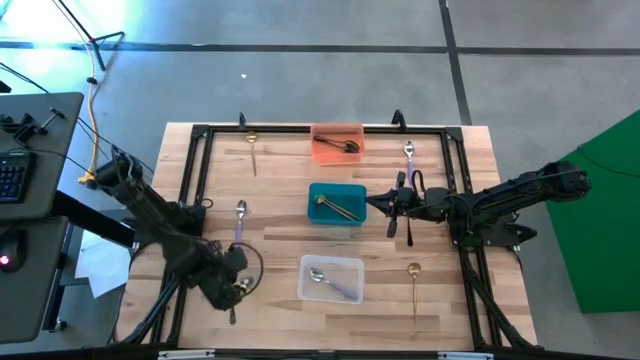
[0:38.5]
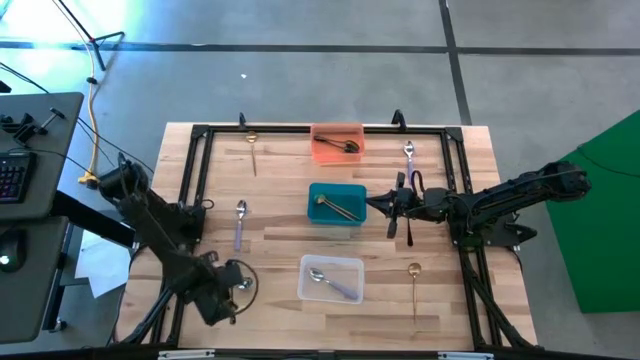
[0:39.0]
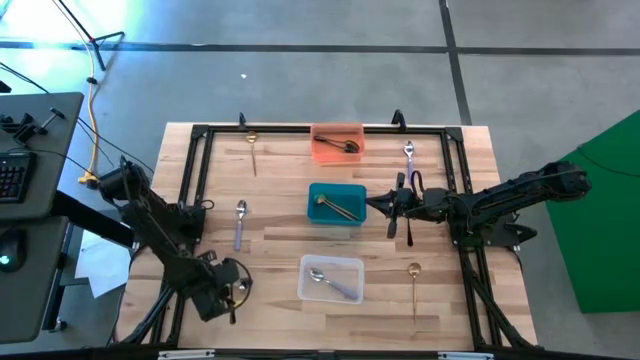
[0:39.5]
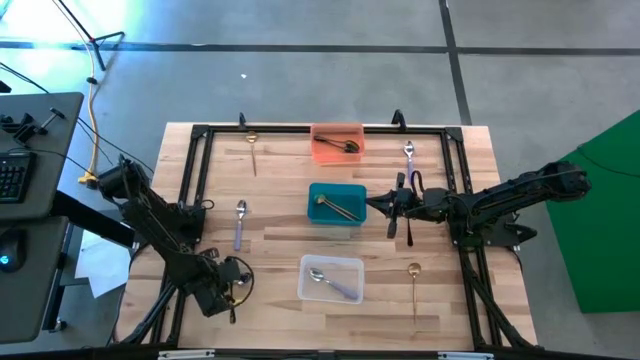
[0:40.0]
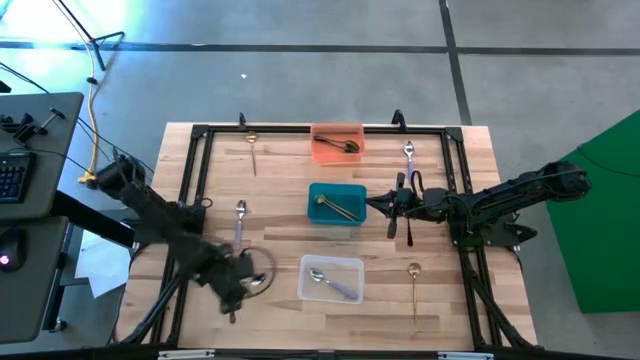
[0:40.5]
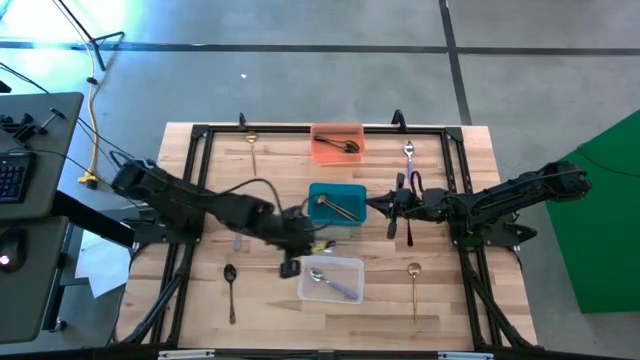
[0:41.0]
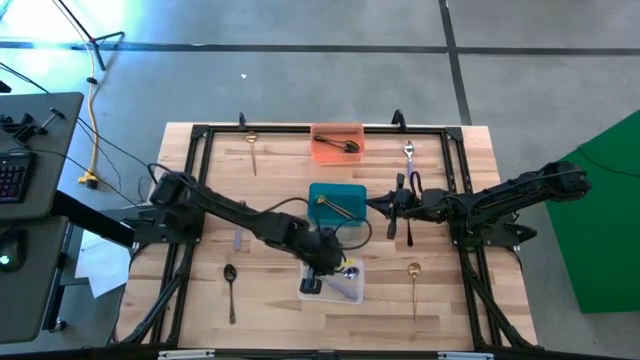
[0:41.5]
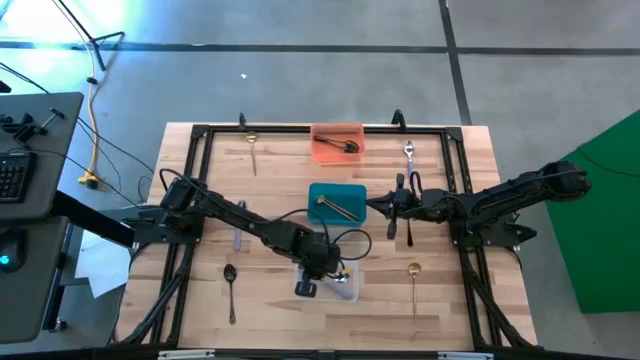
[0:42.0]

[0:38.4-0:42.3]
Task: Sort silverware by color (type)
Put the purple spoon into the transparent bin

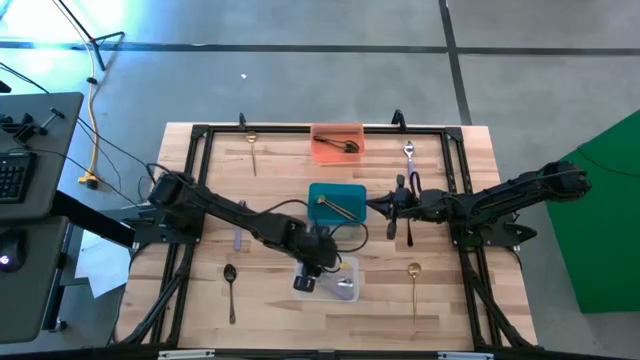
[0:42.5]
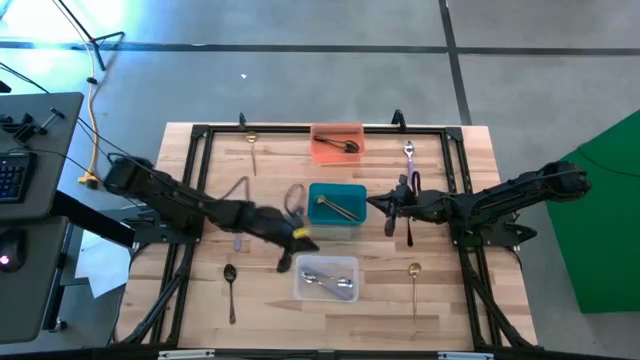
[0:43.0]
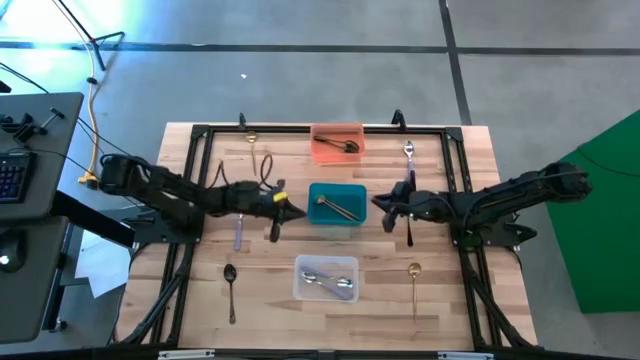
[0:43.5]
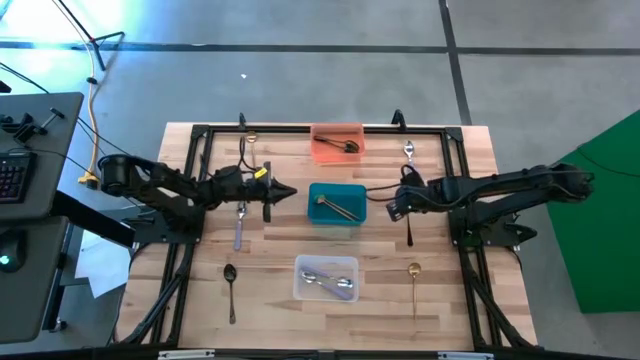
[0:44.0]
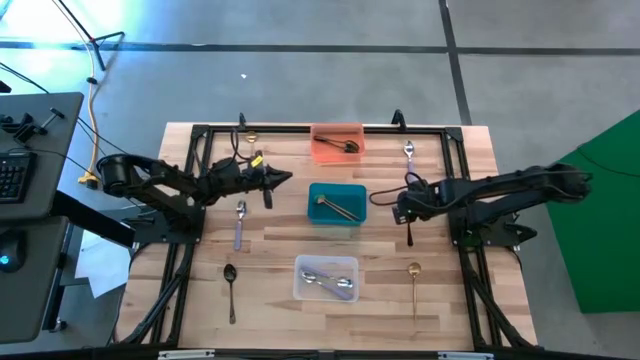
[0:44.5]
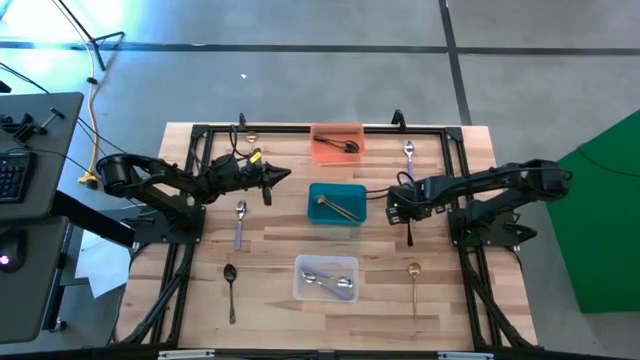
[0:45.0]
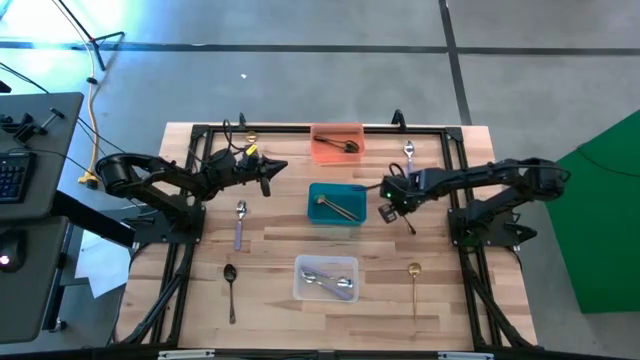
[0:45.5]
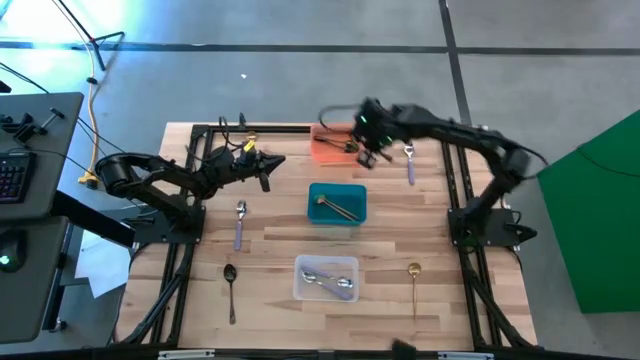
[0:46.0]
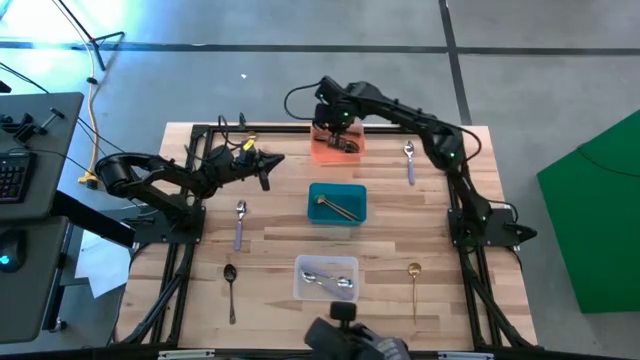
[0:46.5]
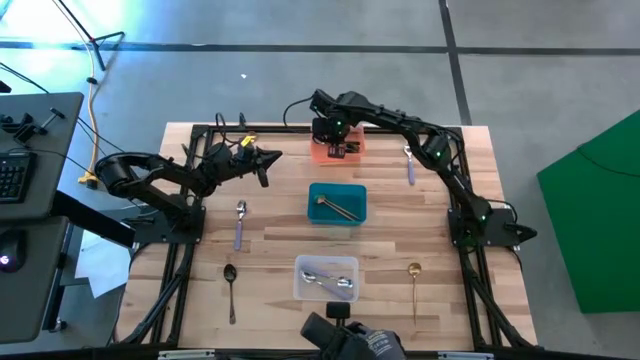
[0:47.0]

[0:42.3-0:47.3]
Put the black spoon into the orange bin

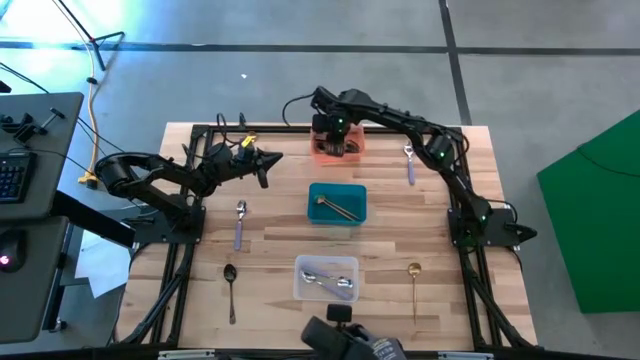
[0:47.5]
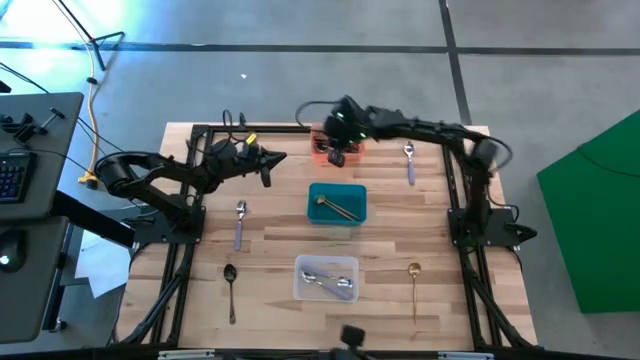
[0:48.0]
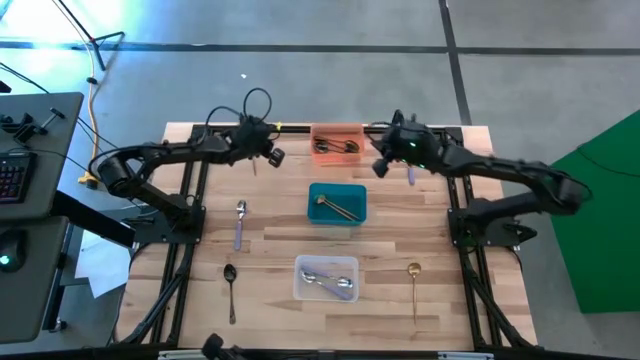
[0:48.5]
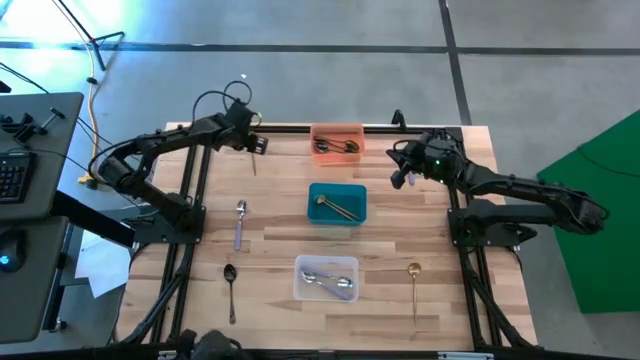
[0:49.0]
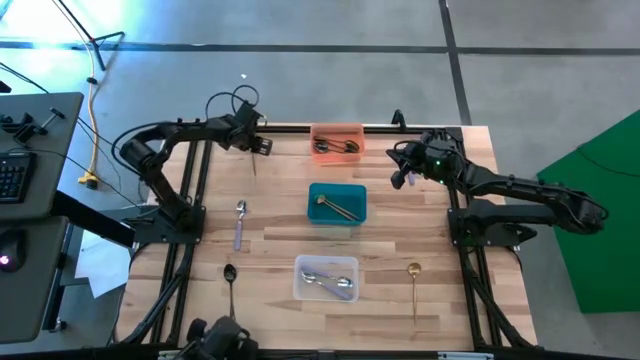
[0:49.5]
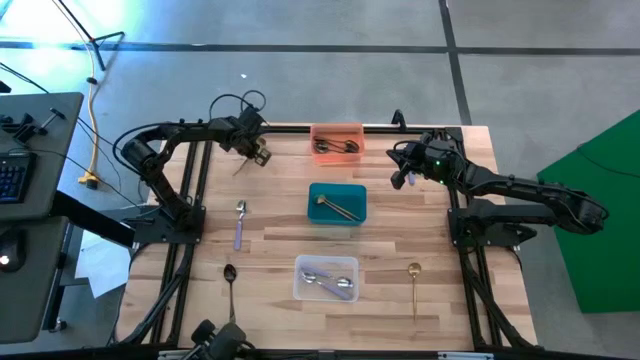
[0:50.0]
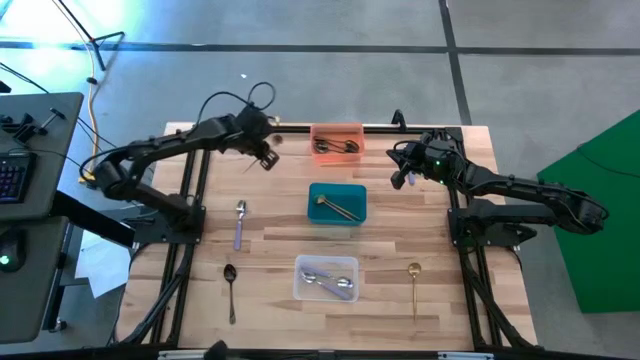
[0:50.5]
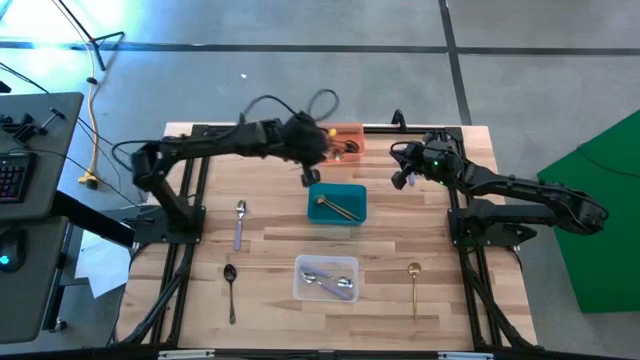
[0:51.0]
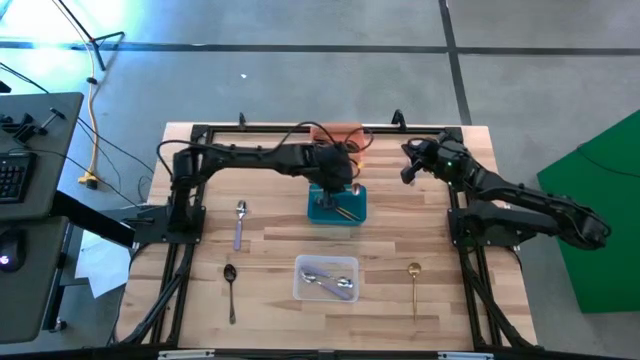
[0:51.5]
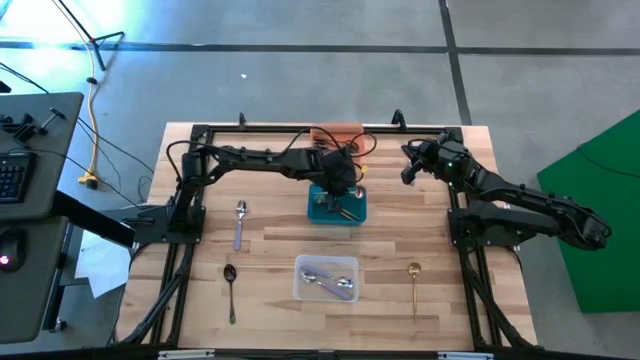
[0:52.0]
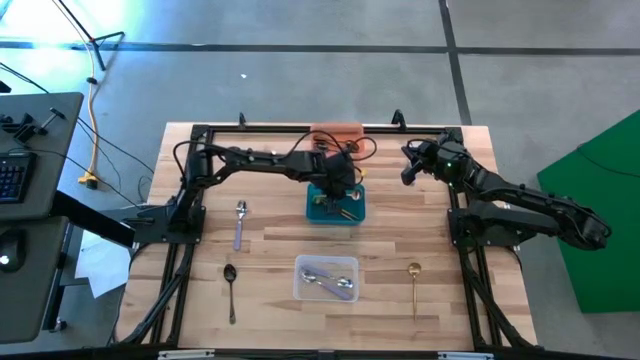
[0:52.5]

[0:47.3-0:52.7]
Put the gold spoon into the dark green bin

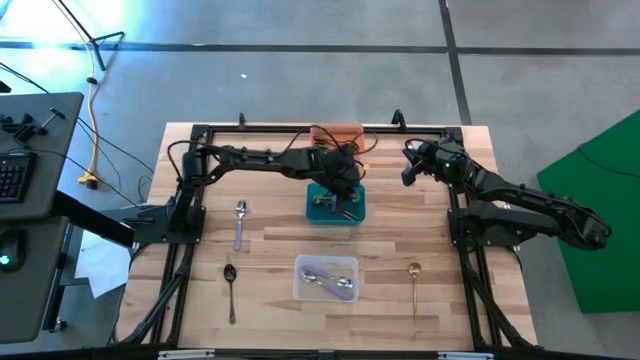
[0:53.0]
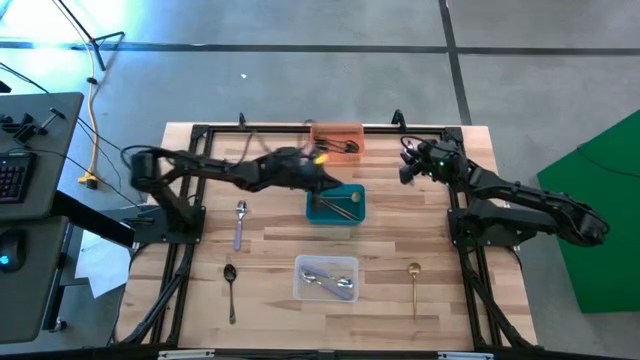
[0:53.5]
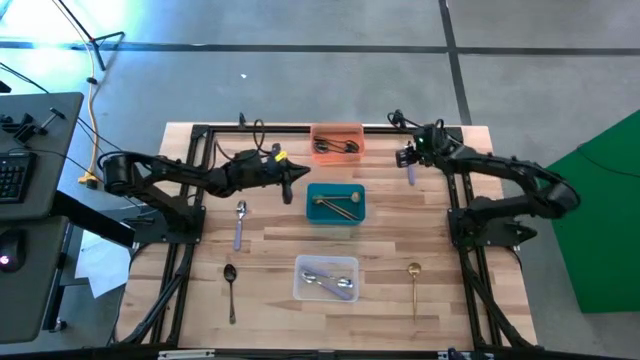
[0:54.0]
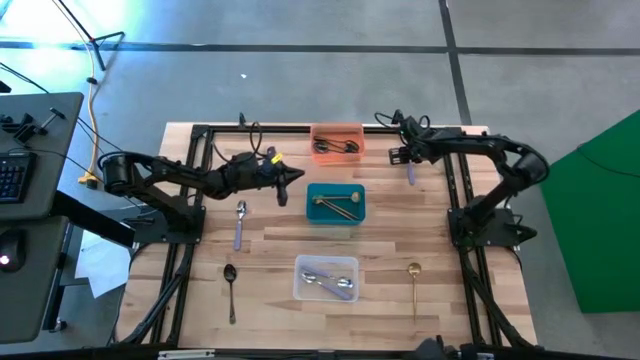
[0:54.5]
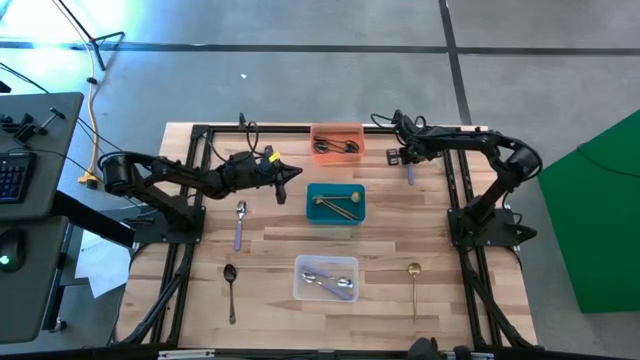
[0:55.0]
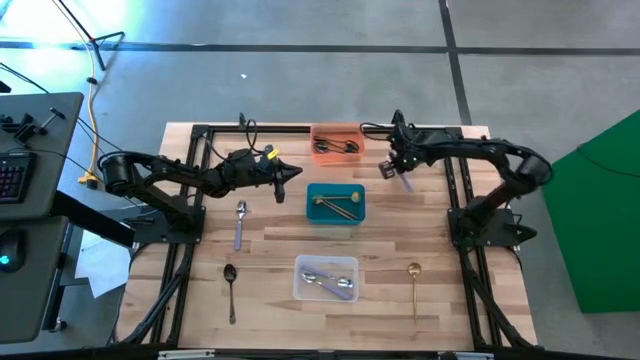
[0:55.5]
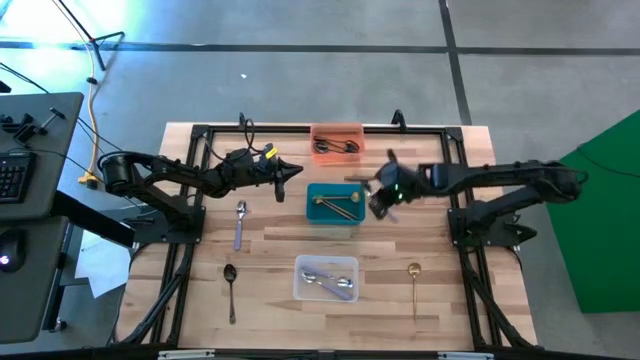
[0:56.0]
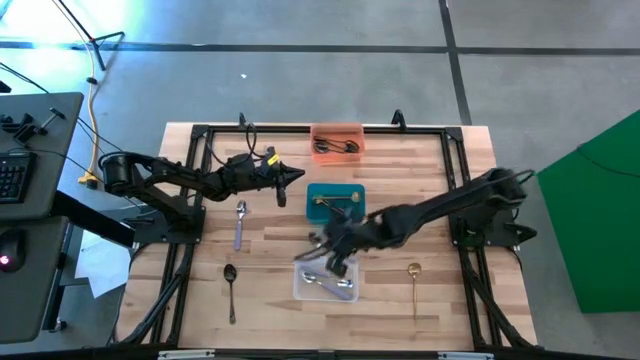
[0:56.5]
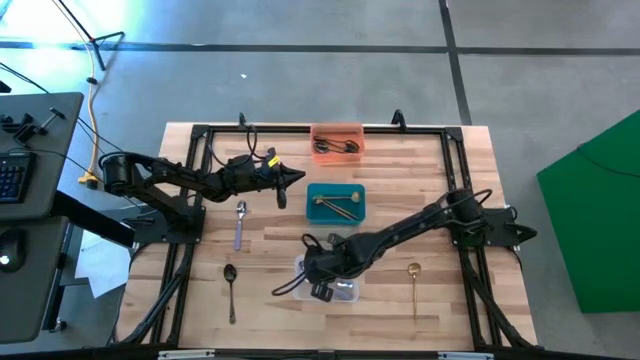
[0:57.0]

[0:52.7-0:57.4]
Put the purple spoon into the transparent bin
